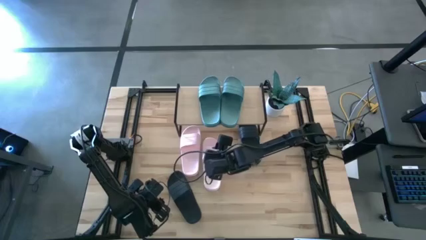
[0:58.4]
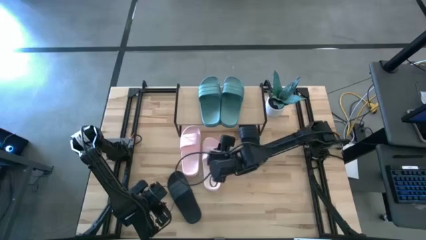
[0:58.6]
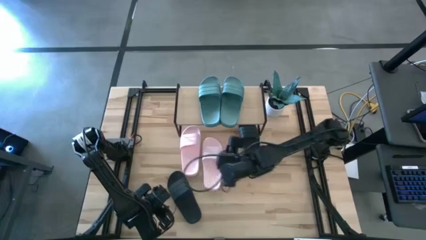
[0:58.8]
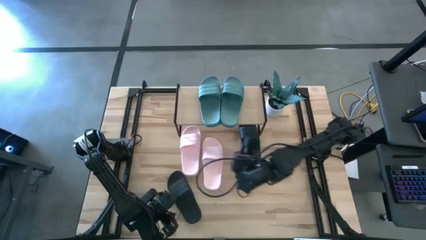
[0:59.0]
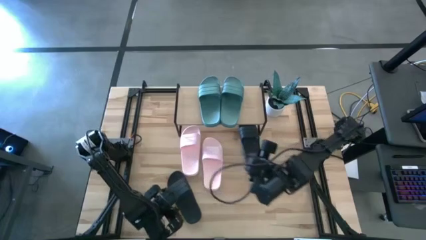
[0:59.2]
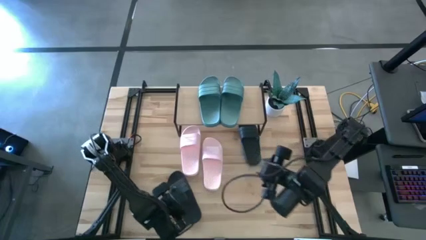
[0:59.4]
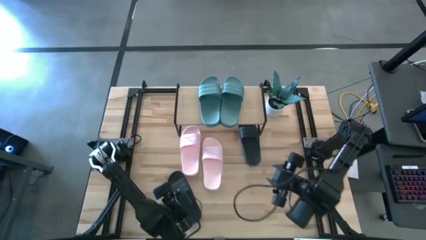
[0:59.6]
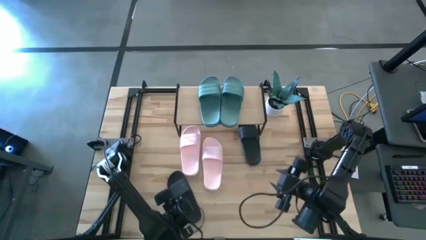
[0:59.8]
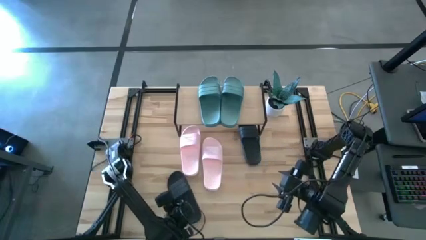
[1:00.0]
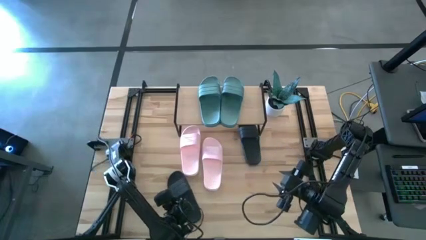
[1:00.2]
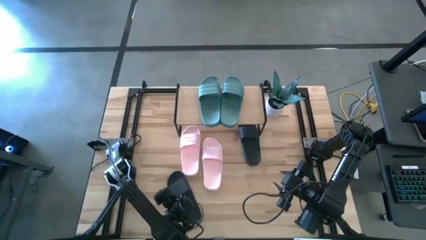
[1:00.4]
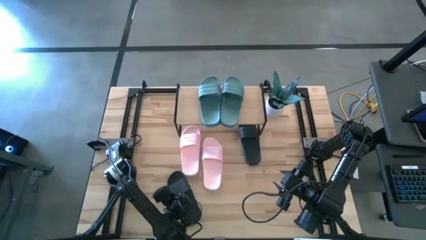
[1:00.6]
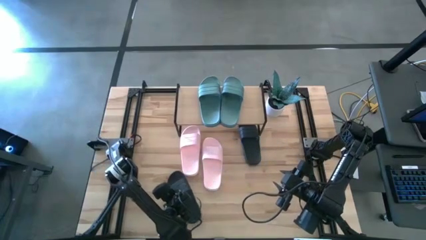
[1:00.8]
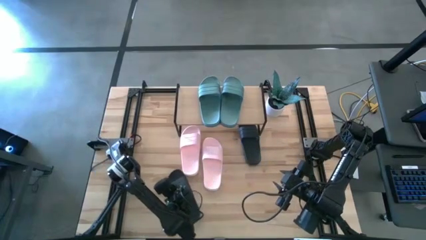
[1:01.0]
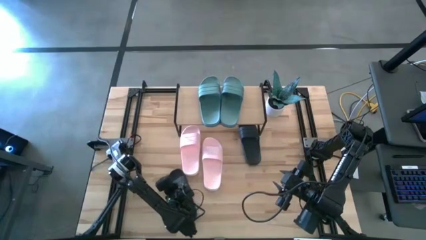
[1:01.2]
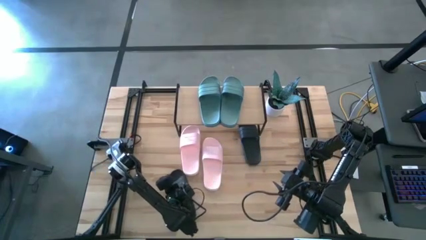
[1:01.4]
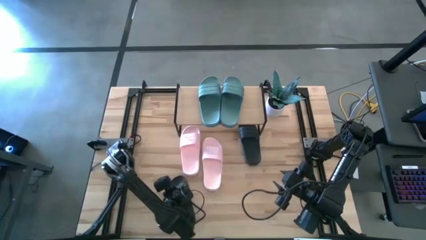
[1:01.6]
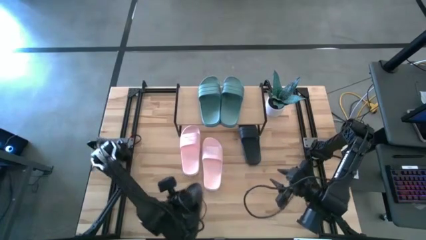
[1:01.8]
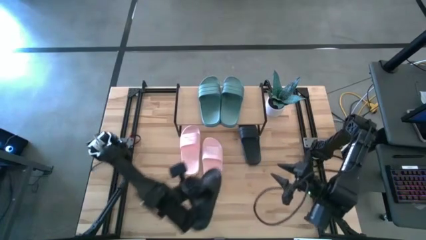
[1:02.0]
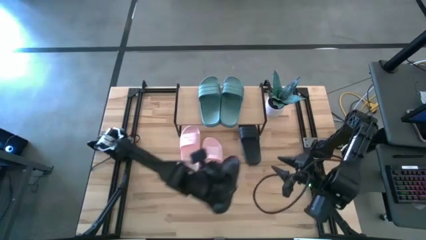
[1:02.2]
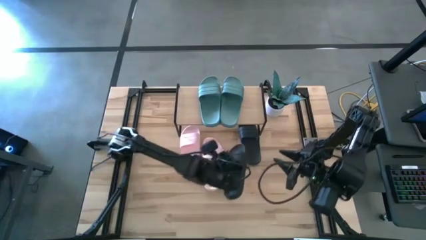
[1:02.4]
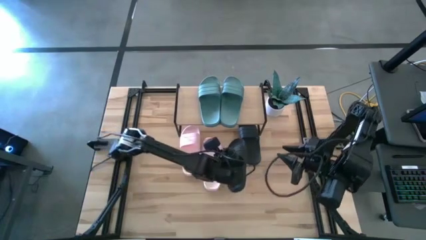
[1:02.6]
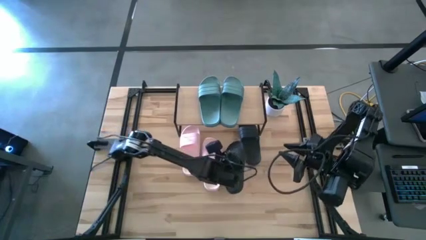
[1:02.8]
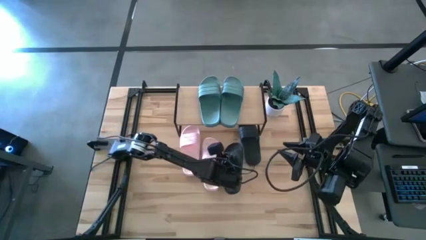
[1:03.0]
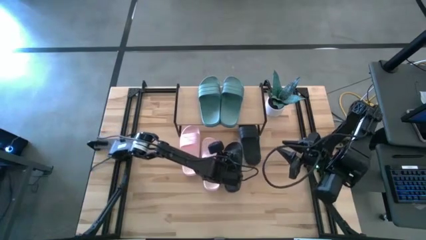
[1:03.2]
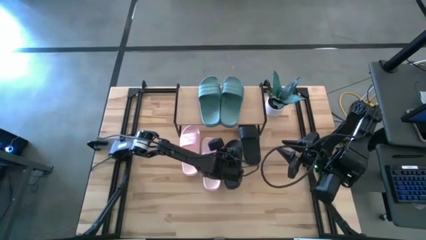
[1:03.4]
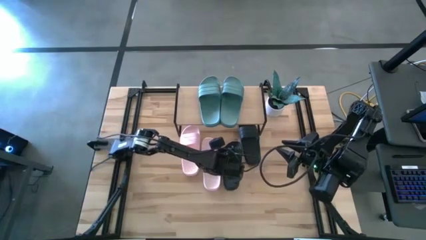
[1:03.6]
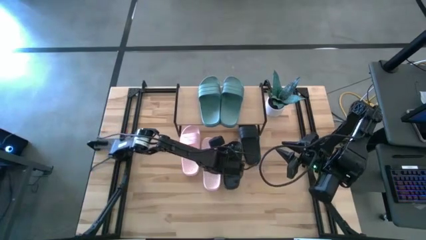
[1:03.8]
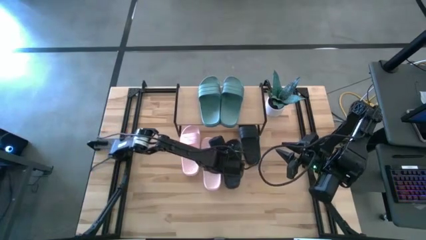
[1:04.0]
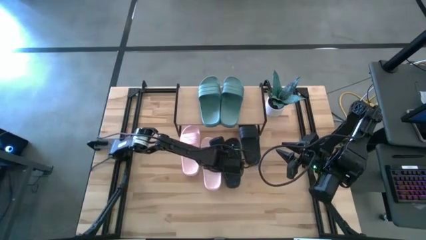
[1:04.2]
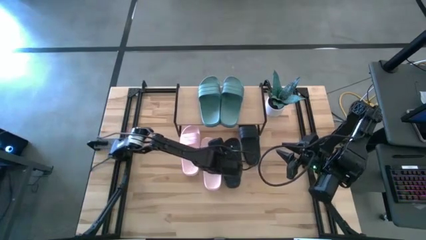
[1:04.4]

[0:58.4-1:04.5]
Task: Pick and place slides into the shelf
Move the left black slide to the right of the right pink slide

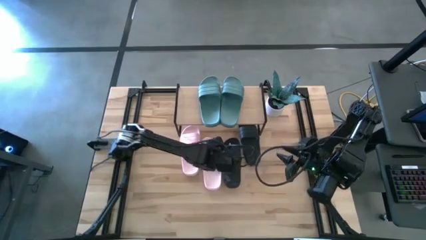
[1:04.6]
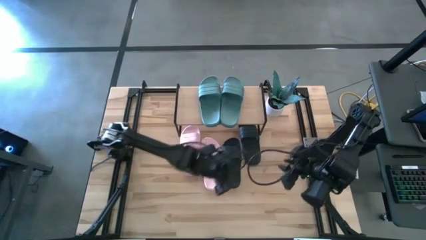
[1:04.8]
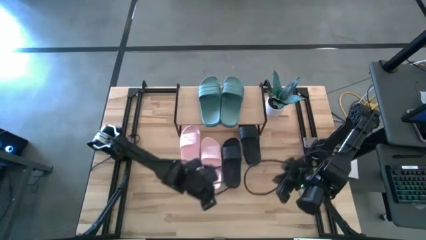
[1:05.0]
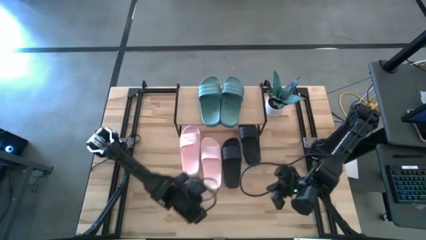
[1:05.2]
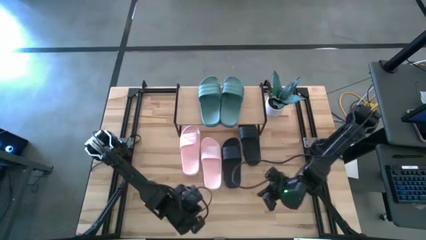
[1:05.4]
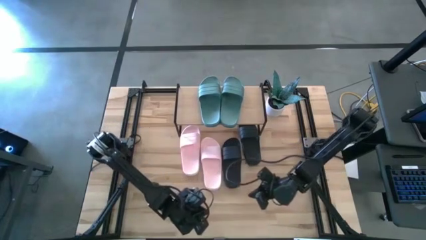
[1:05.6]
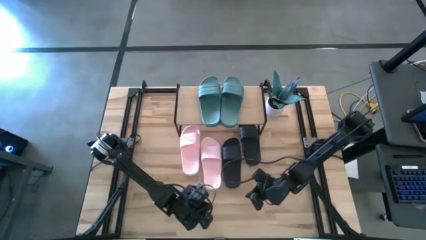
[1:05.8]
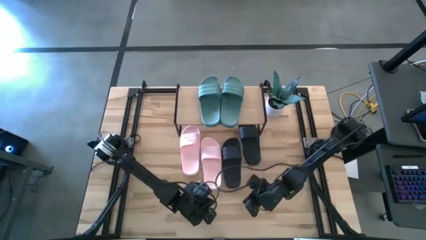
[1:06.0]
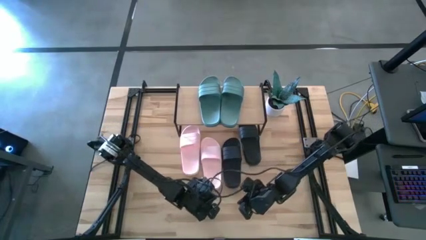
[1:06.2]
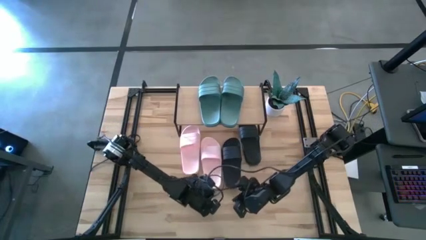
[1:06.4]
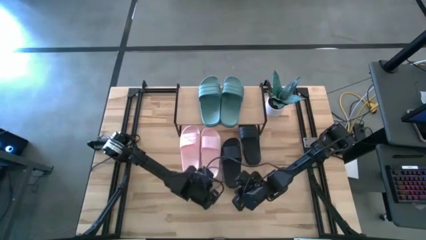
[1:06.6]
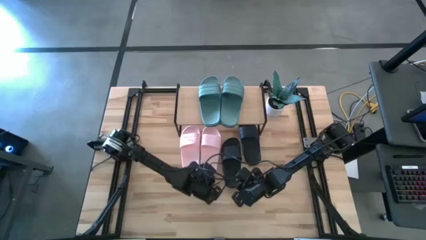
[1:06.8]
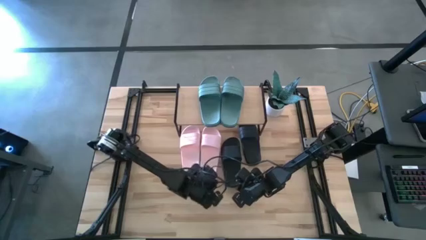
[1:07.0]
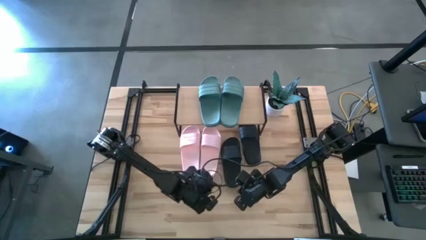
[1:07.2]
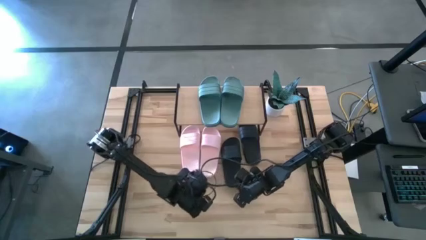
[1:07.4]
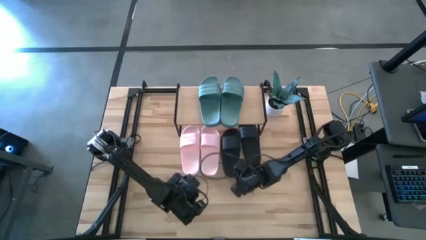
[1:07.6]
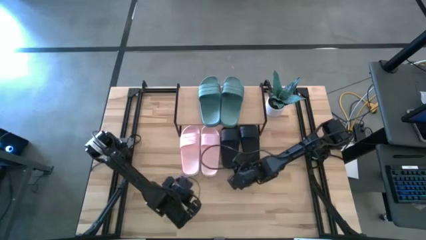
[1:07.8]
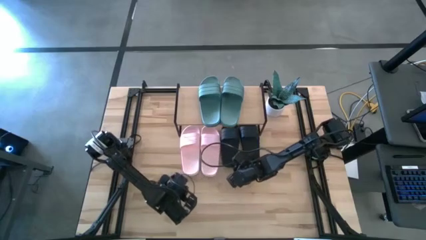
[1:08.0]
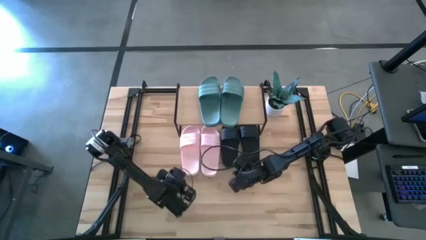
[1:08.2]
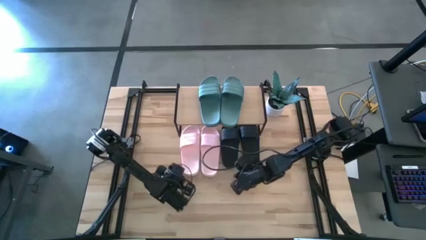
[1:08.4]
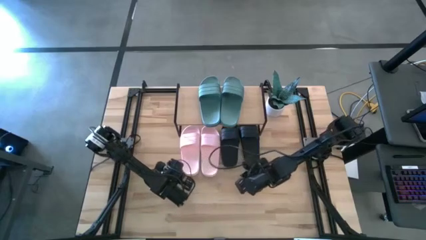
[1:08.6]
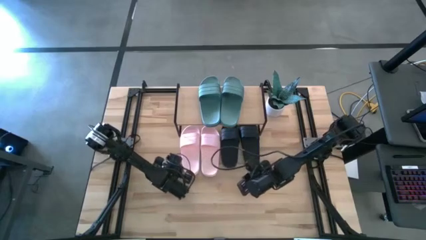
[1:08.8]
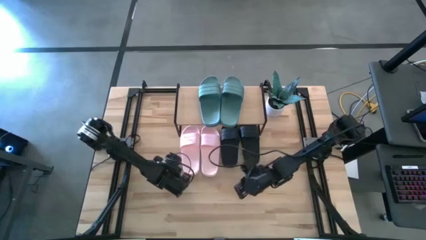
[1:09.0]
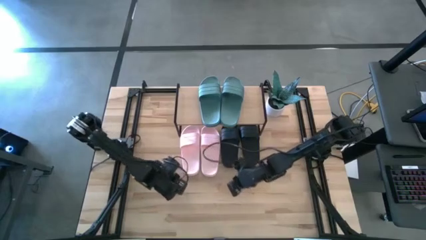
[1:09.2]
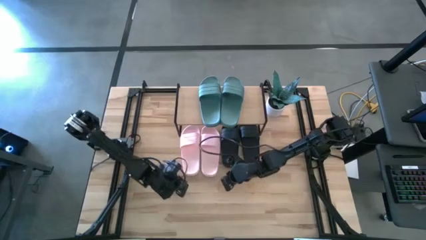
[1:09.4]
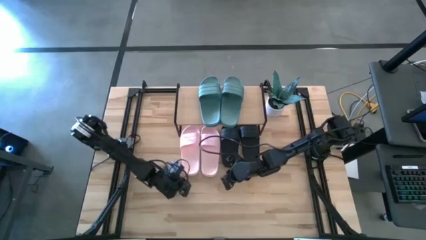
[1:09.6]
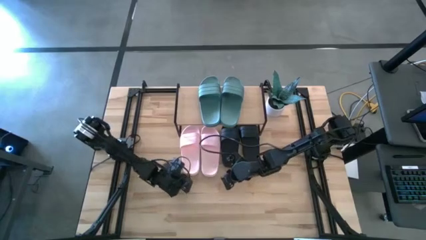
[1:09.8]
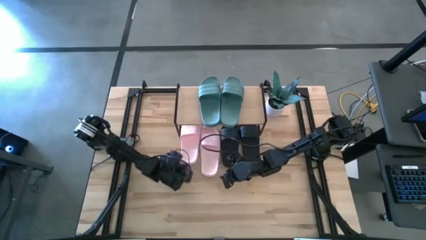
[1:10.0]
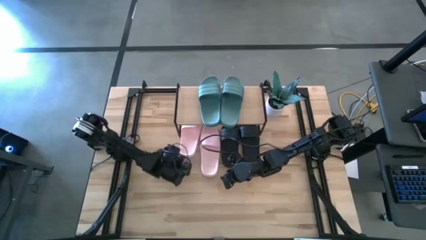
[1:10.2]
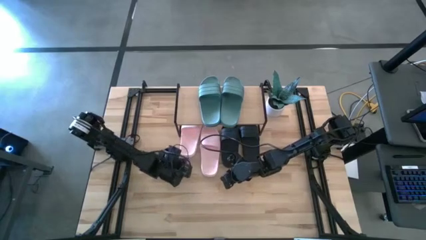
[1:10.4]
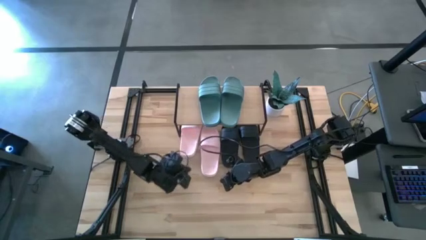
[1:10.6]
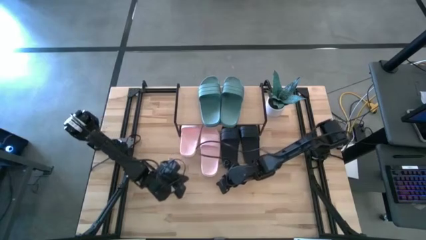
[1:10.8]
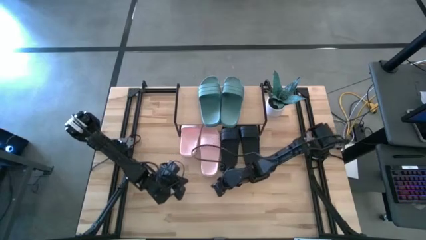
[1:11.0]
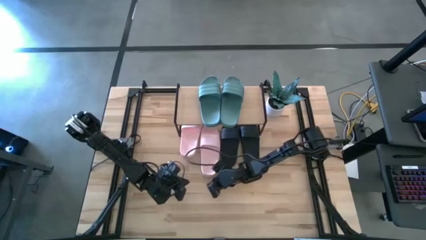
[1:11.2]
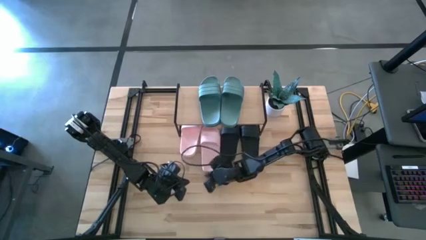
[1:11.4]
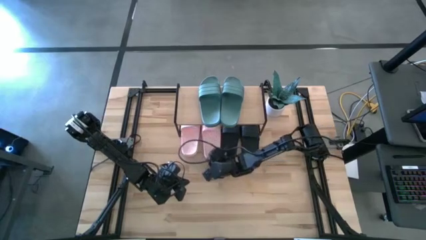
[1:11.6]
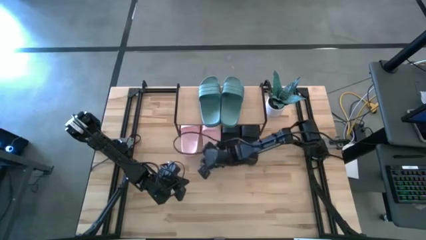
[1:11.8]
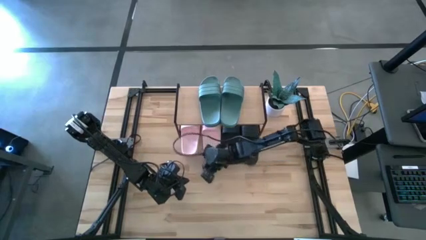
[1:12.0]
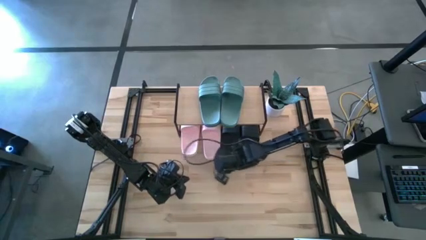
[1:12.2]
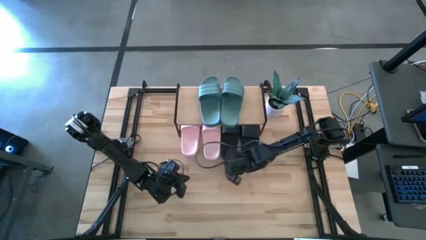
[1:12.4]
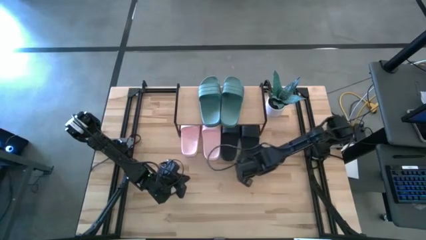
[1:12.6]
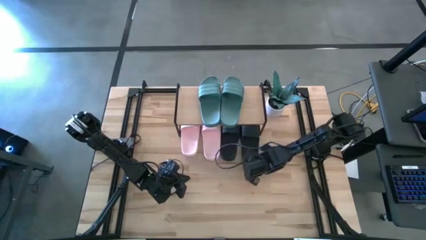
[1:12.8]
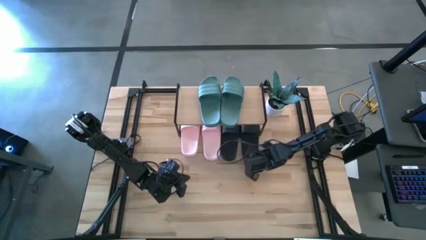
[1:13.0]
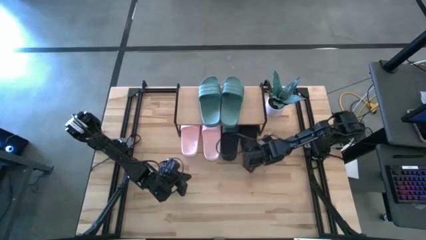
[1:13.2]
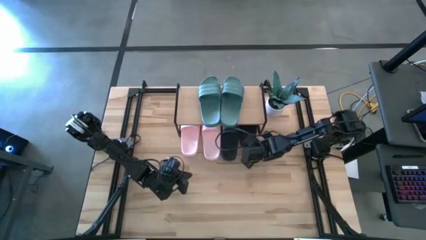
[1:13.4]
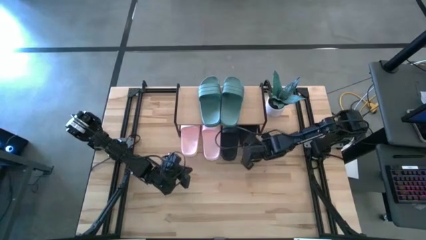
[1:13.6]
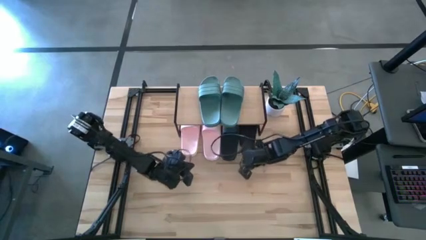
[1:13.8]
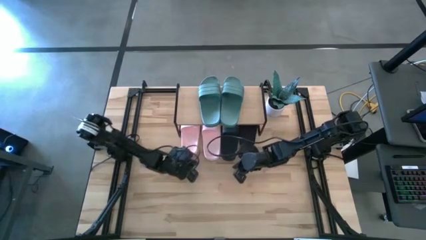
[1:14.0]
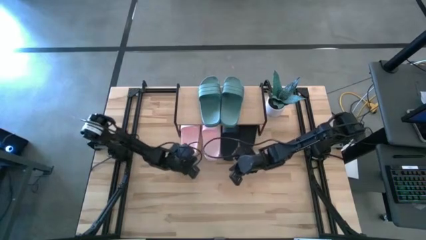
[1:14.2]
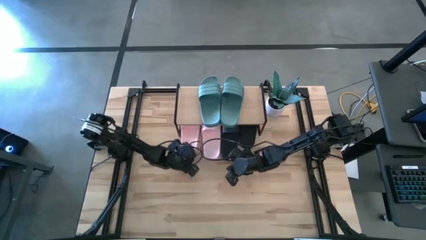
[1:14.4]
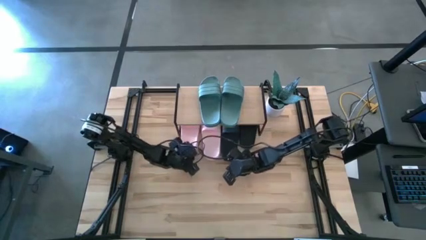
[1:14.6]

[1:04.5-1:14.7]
Adjust the slides under the shelf
